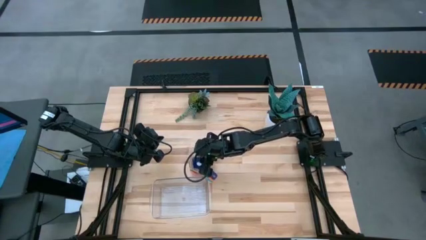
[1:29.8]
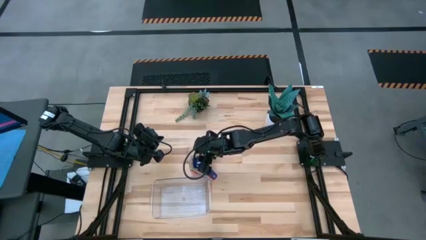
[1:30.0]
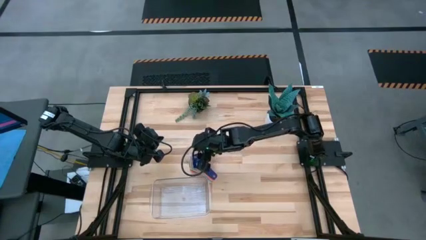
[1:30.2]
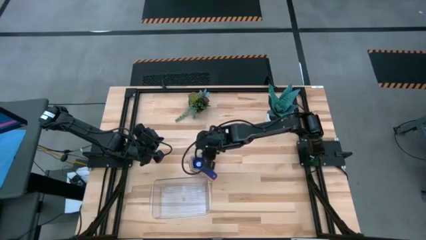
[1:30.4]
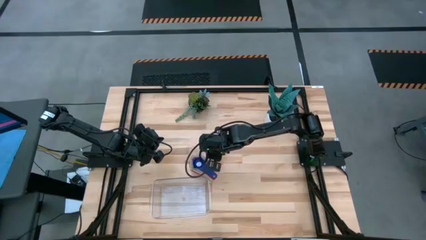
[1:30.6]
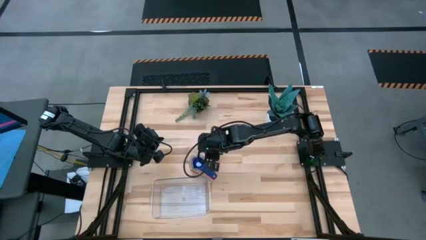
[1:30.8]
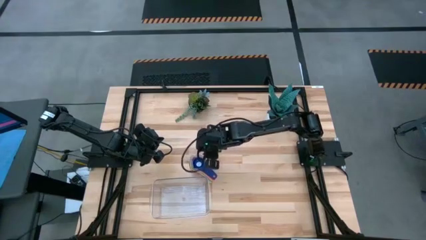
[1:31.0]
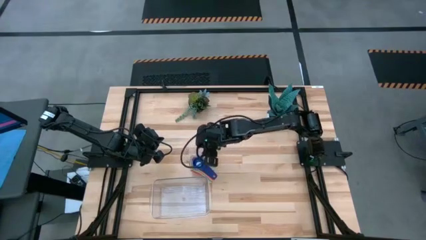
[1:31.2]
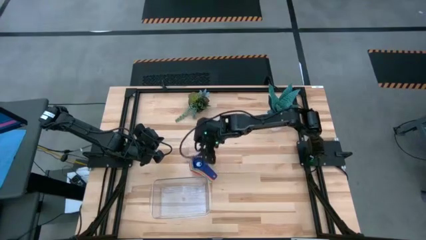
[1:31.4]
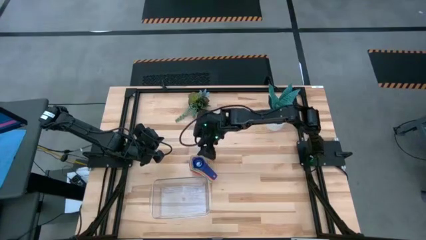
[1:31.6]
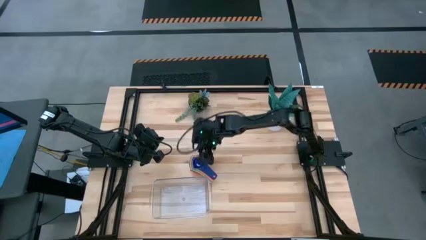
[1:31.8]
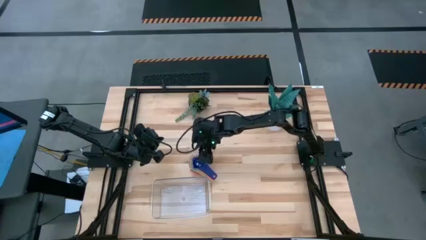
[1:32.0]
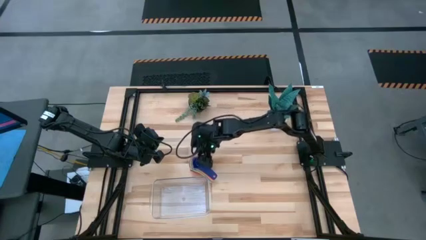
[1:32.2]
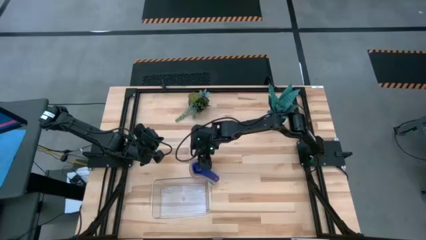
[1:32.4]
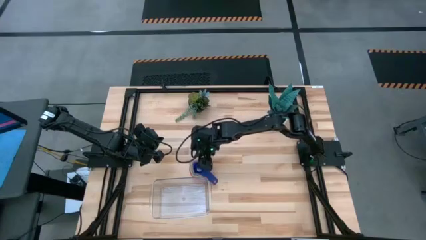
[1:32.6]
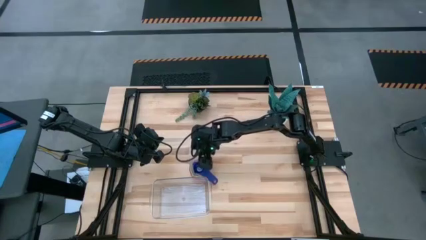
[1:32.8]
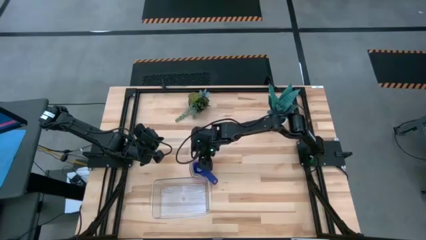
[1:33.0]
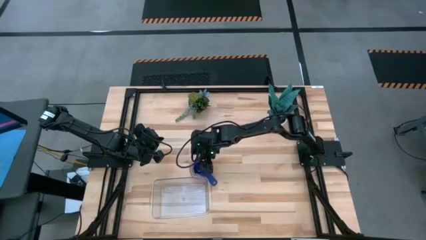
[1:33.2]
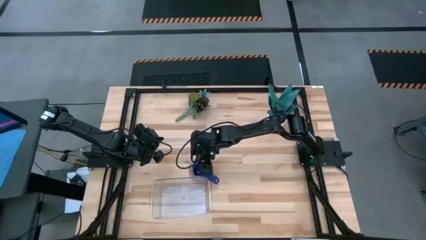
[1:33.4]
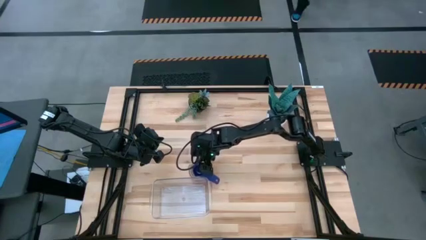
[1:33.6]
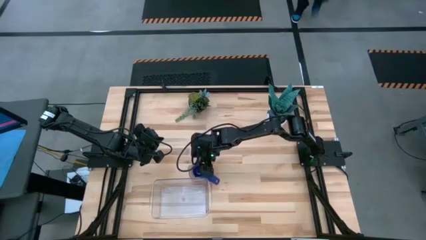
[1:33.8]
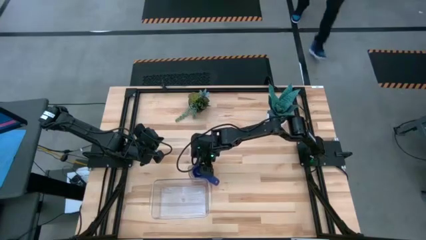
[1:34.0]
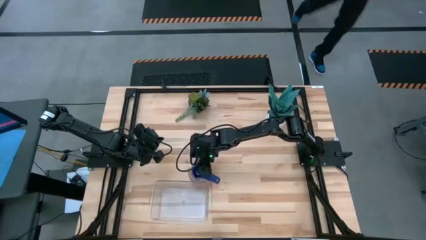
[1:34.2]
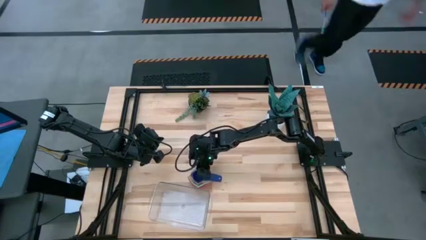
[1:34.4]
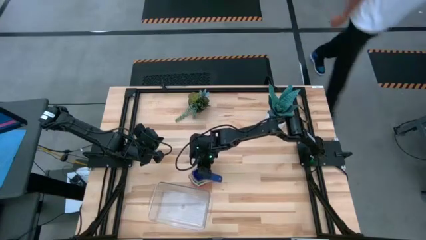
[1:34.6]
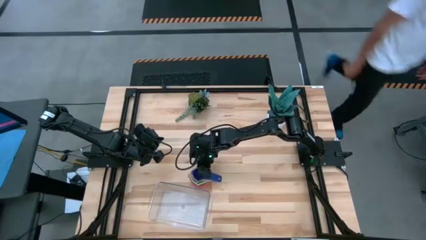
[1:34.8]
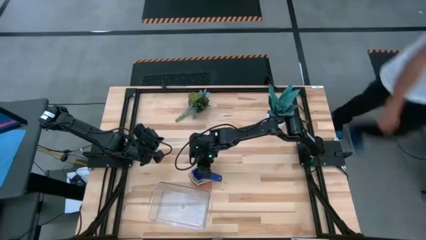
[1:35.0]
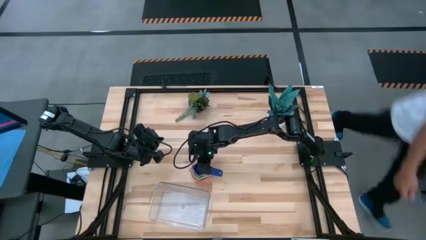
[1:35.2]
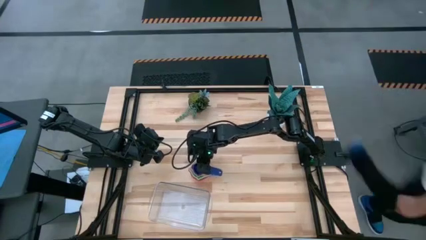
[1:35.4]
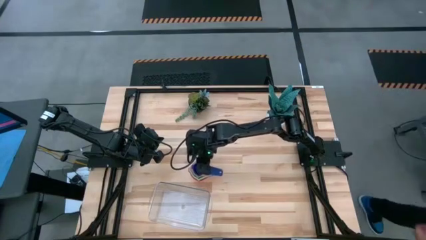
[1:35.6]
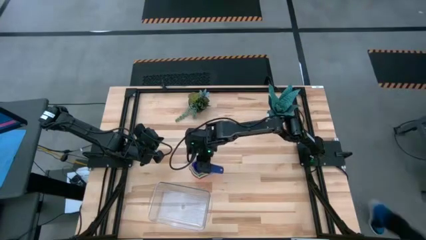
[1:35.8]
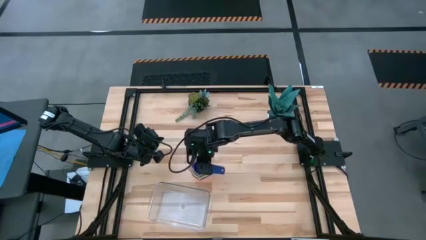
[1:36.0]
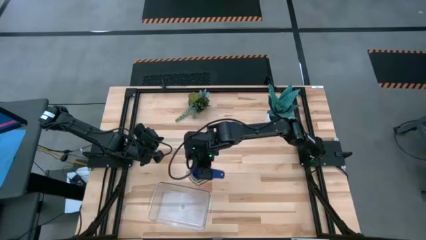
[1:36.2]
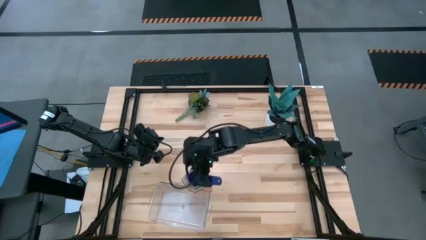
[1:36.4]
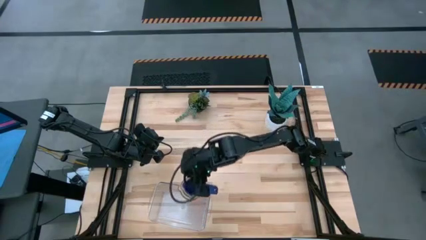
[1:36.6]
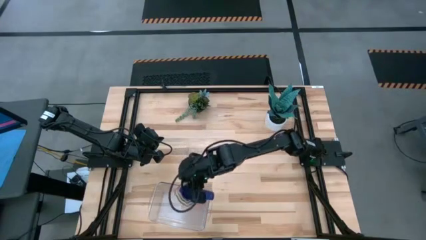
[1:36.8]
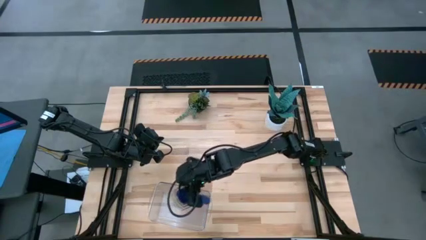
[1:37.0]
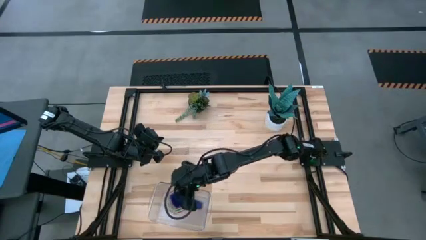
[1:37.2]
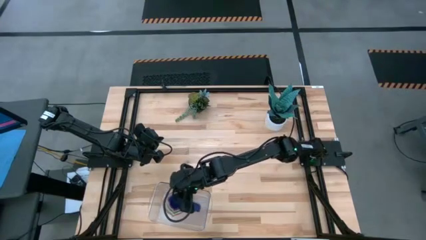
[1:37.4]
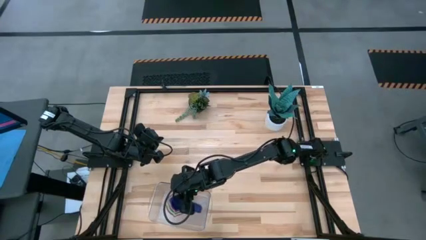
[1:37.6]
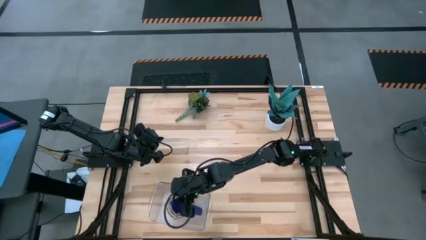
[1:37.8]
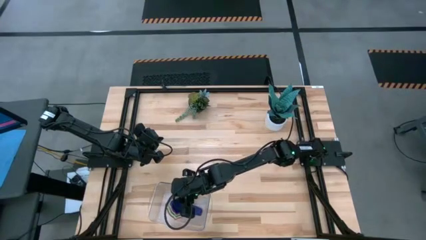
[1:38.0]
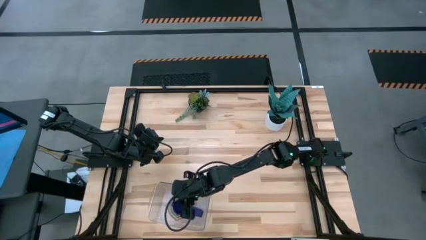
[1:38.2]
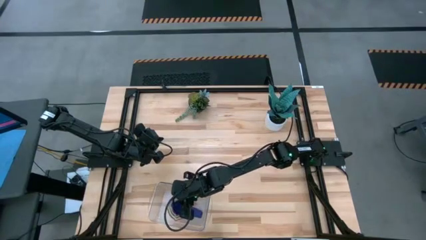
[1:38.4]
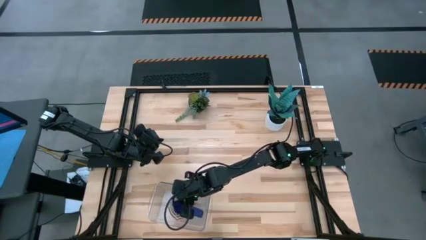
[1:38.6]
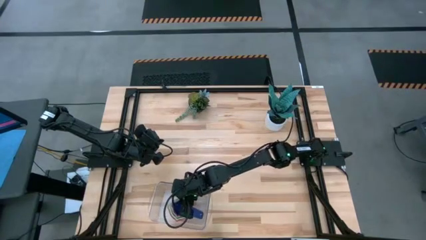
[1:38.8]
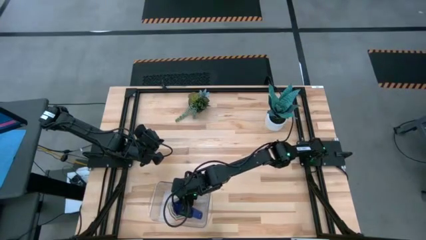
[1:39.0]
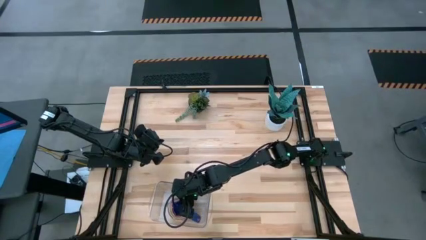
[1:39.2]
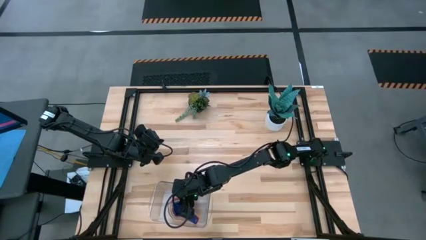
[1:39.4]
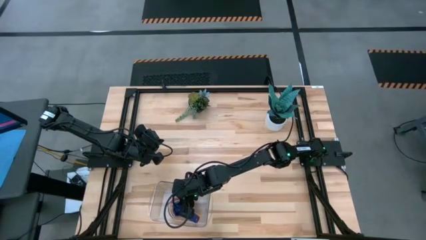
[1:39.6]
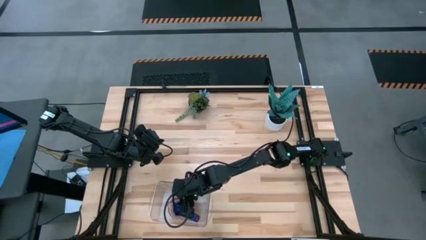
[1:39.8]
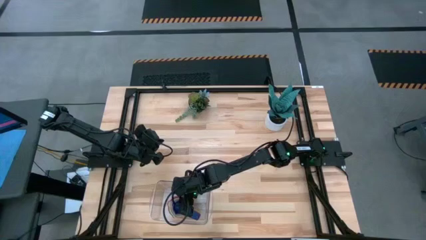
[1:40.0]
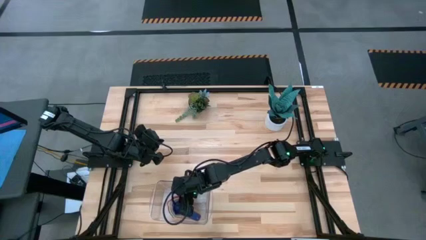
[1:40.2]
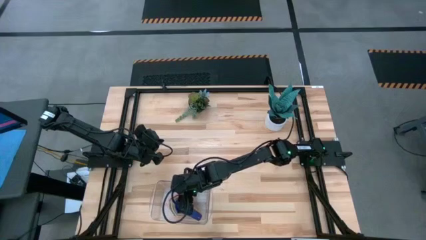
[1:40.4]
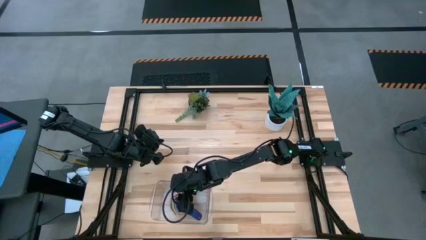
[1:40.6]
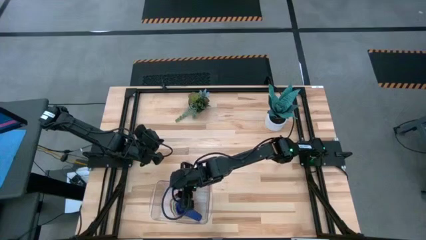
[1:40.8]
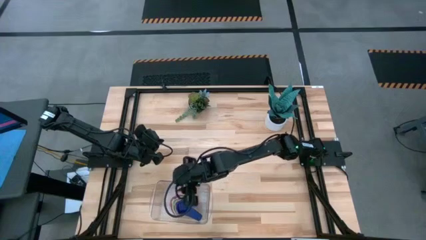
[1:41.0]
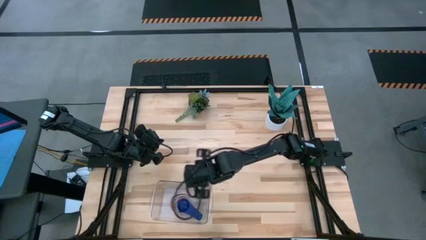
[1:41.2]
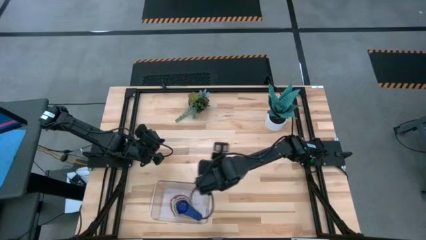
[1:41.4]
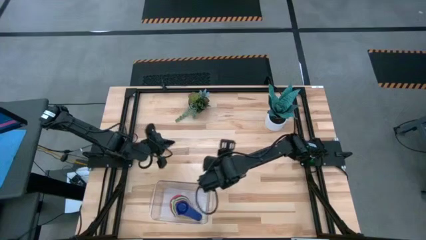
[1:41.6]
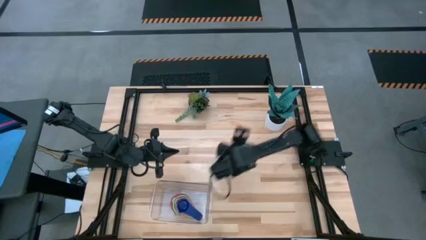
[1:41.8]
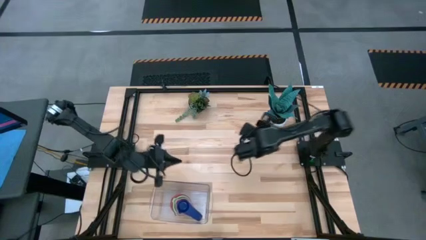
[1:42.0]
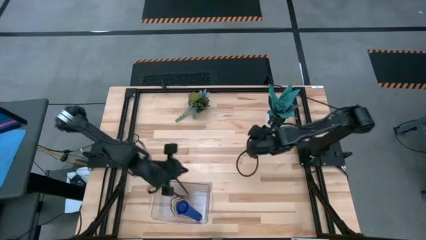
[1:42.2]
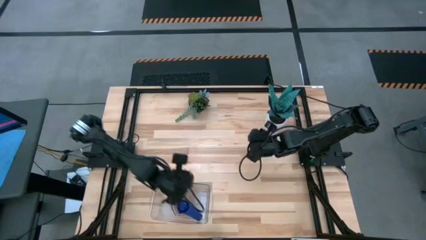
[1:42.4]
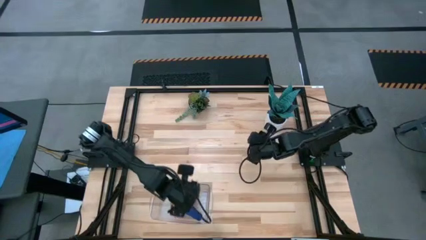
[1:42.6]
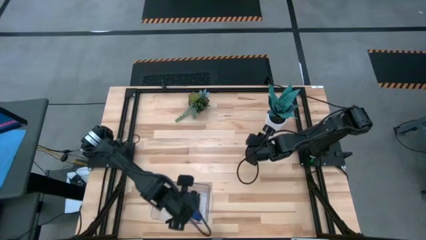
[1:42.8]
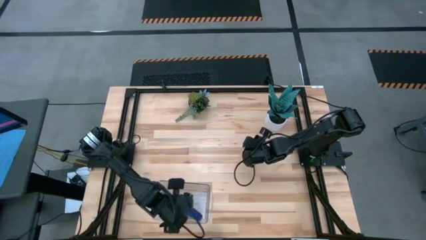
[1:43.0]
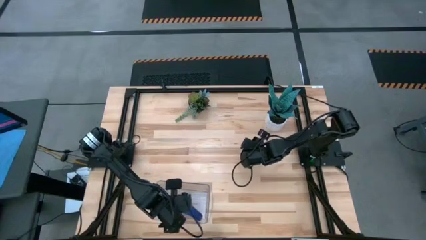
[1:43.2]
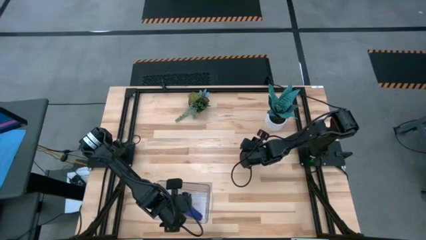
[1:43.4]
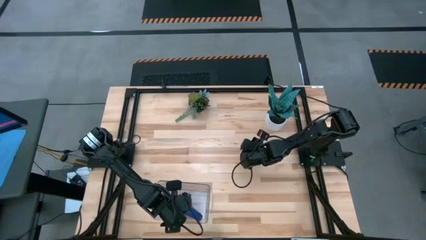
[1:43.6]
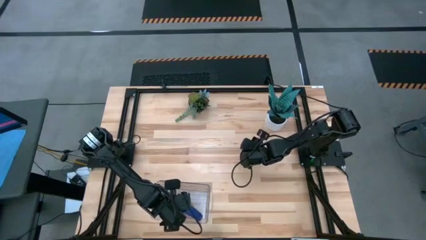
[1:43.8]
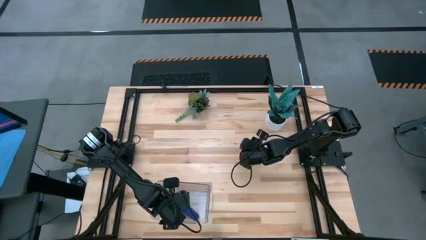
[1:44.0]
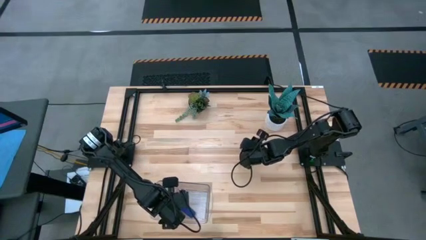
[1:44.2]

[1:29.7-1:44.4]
Task: Nest measuring cups in basket
Put the stacked measuring cups into the transparent bin

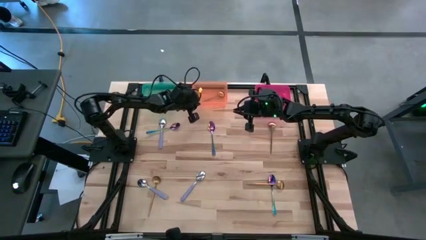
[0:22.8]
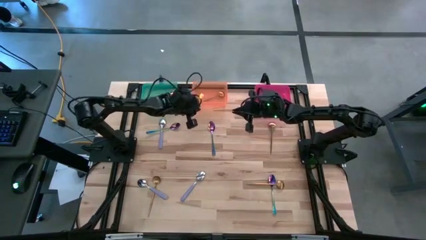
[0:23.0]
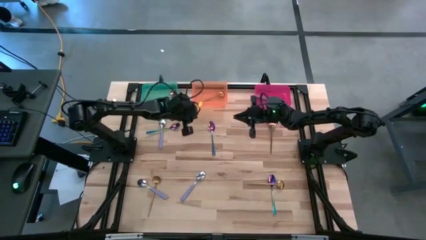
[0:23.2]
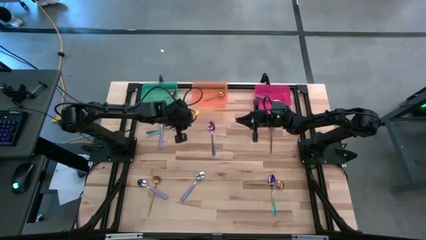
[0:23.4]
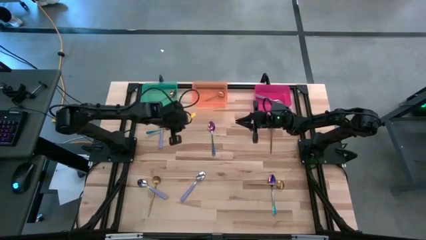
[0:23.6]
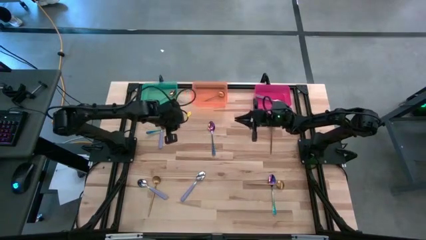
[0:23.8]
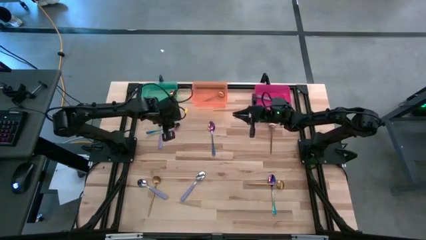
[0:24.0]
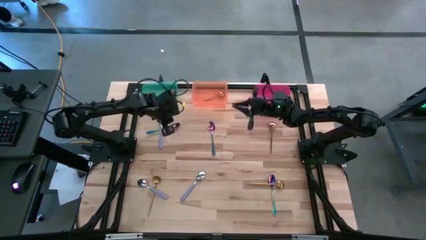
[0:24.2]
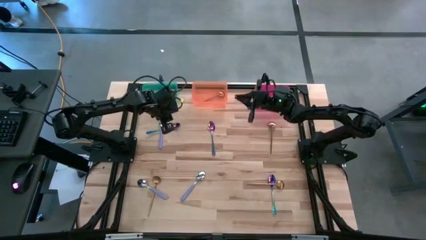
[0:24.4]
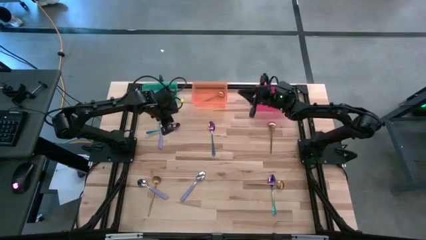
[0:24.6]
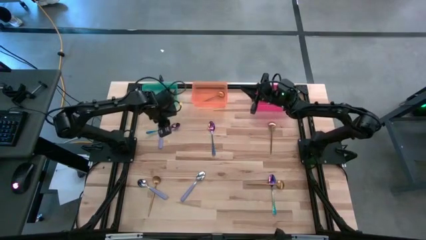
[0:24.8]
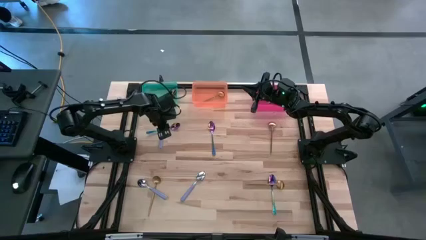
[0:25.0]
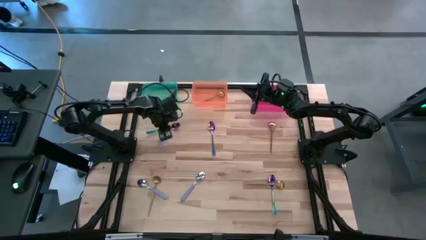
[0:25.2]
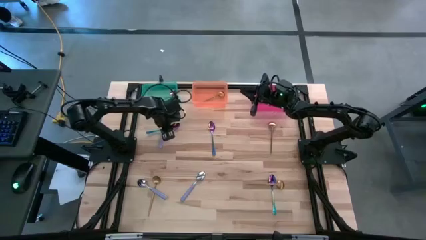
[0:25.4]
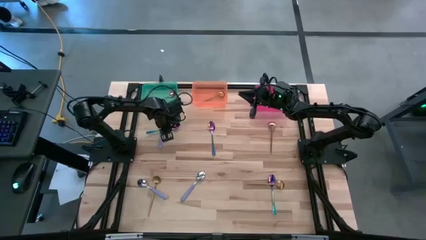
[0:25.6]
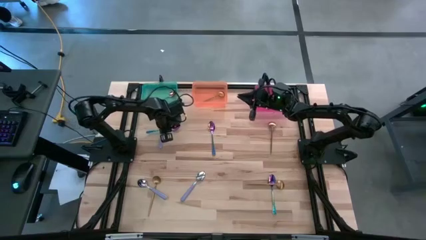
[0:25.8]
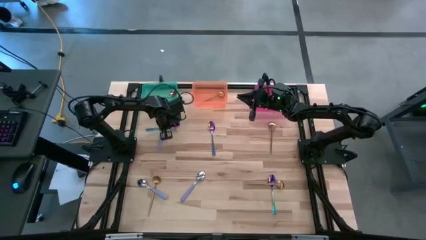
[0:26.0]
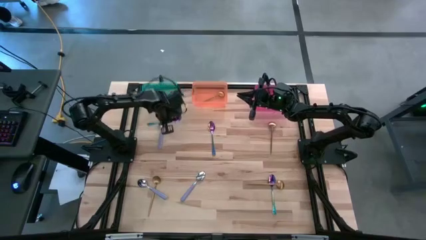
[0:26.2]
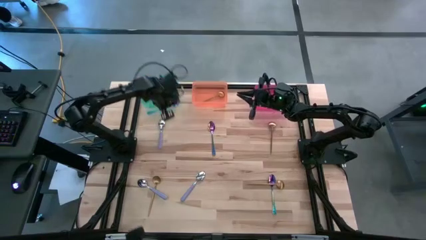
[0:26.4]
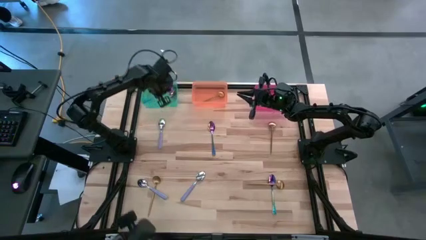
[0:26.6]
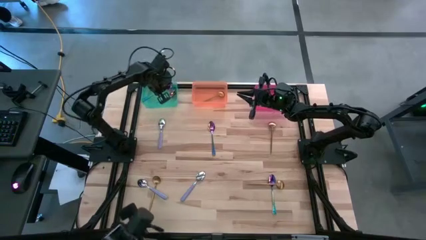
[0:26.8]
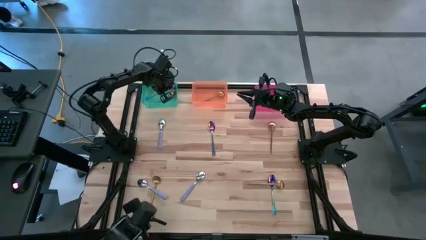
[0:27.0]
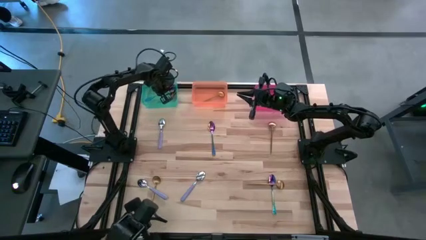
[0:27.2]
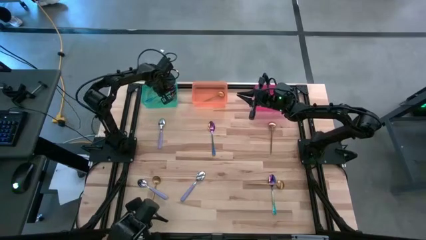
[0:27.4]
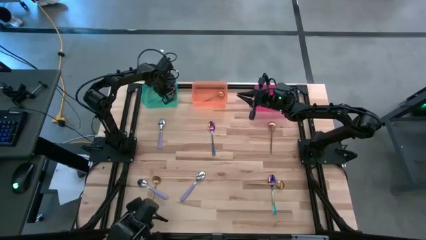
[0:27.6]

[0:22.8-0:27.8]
Task: Sort silverware by color (type)
Put the blue spoon into the green bin
